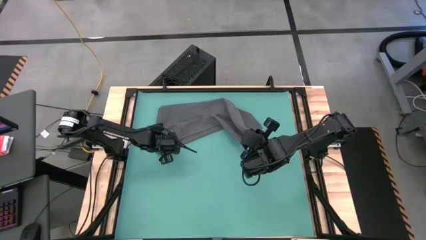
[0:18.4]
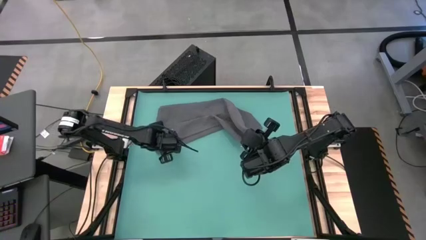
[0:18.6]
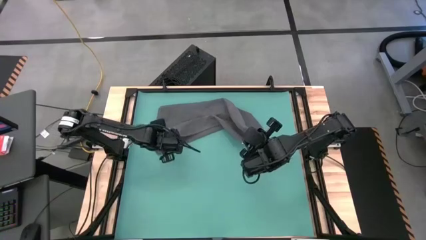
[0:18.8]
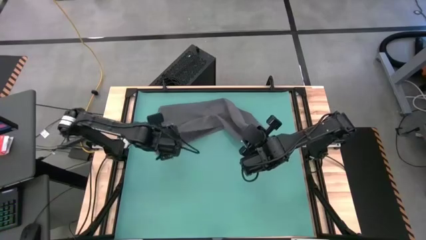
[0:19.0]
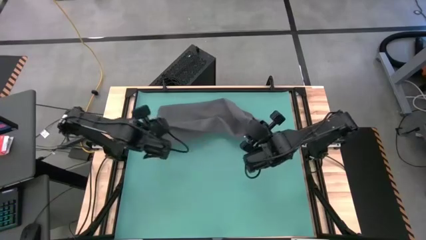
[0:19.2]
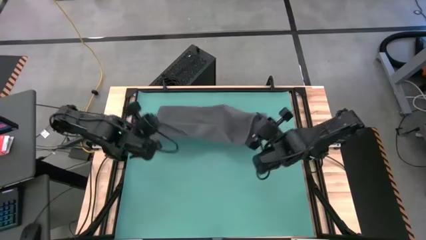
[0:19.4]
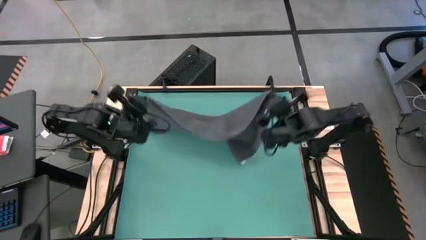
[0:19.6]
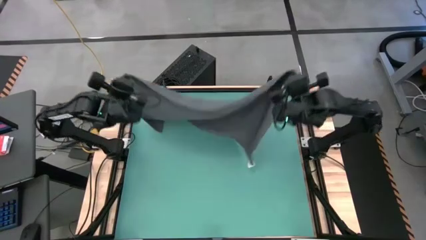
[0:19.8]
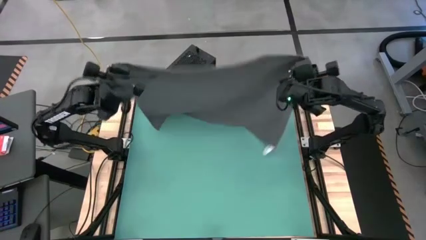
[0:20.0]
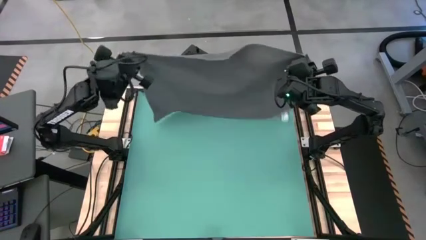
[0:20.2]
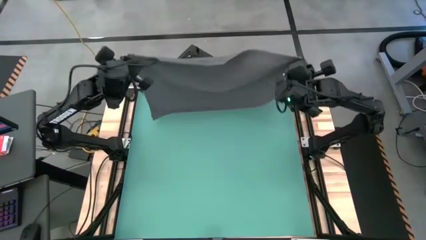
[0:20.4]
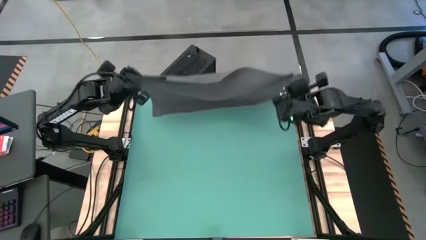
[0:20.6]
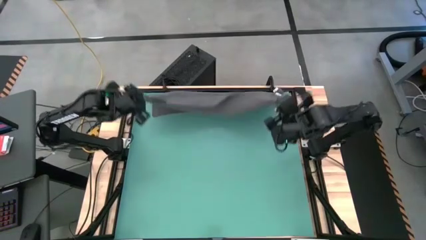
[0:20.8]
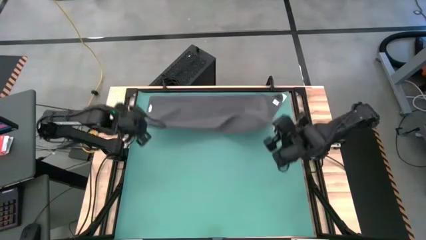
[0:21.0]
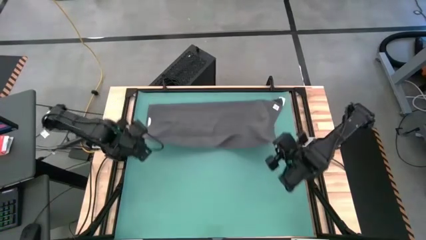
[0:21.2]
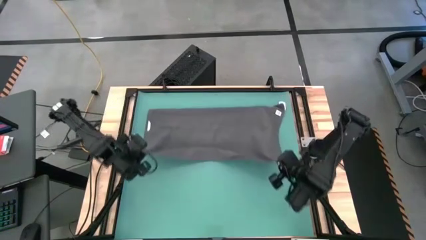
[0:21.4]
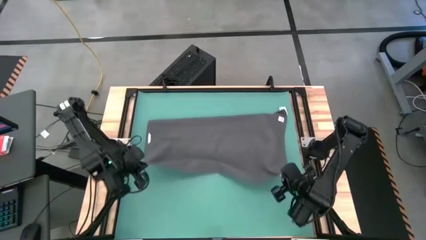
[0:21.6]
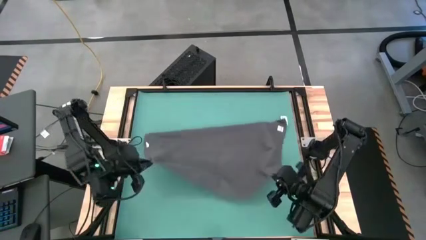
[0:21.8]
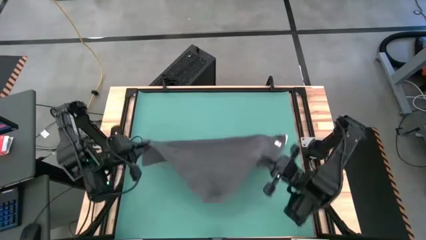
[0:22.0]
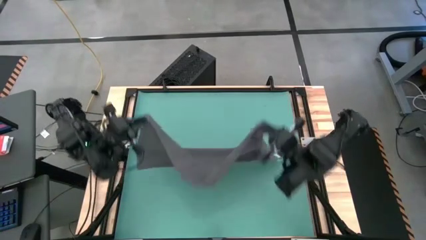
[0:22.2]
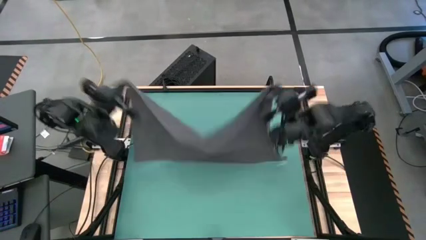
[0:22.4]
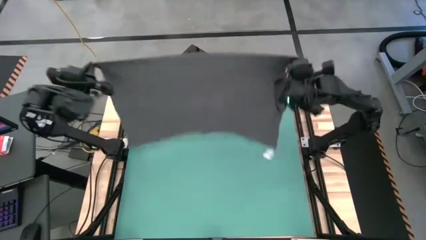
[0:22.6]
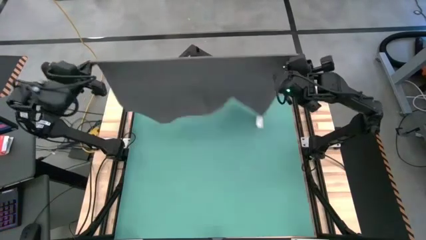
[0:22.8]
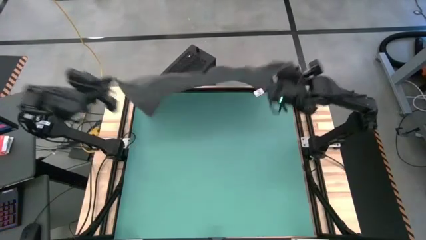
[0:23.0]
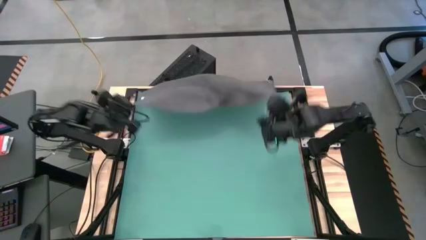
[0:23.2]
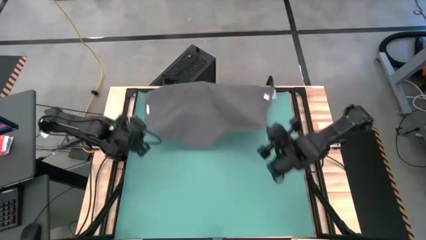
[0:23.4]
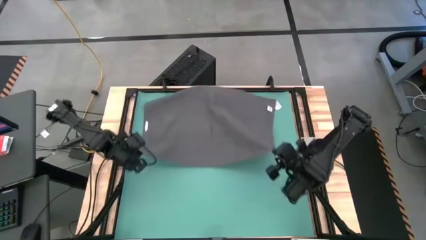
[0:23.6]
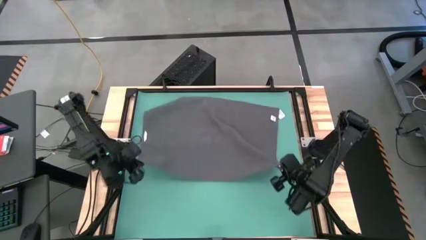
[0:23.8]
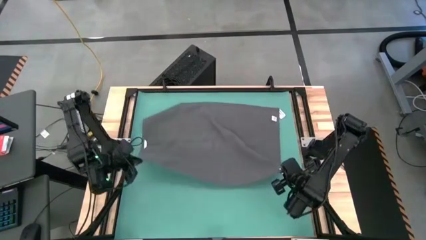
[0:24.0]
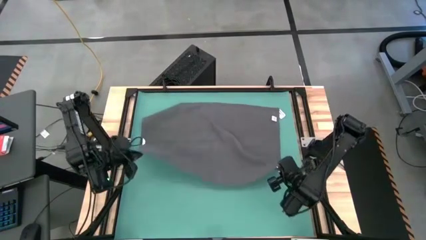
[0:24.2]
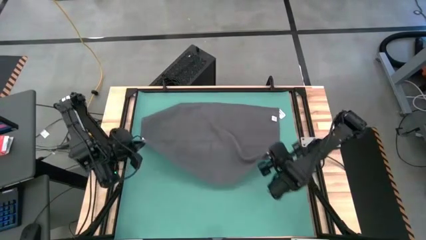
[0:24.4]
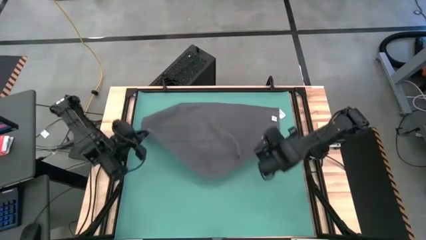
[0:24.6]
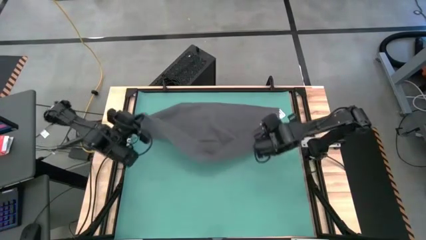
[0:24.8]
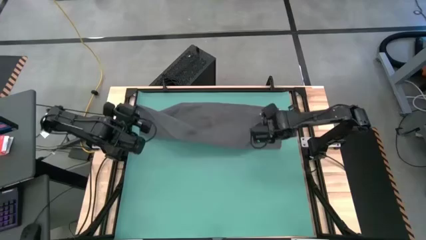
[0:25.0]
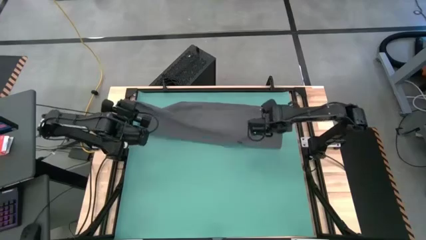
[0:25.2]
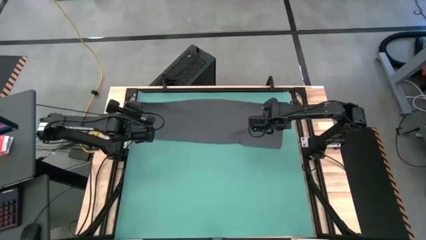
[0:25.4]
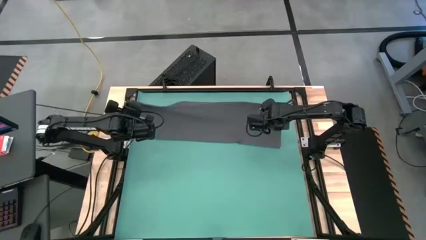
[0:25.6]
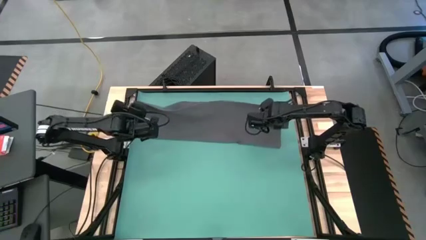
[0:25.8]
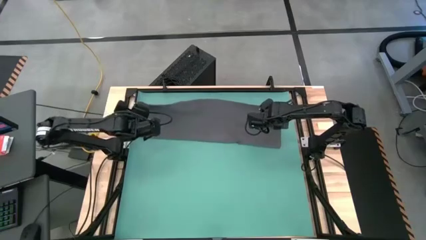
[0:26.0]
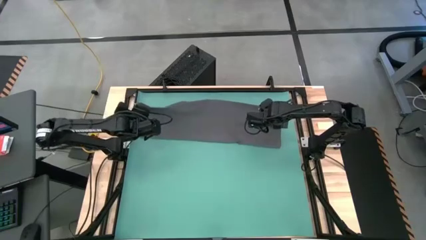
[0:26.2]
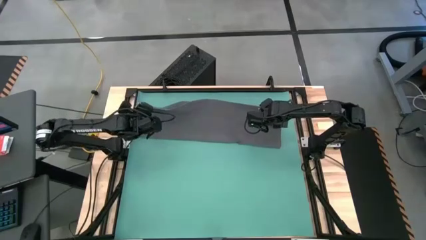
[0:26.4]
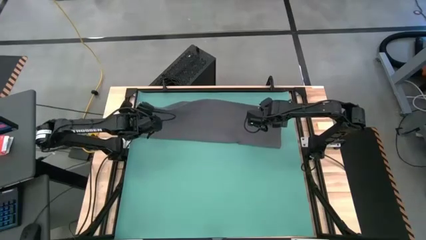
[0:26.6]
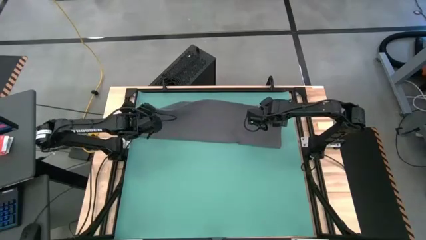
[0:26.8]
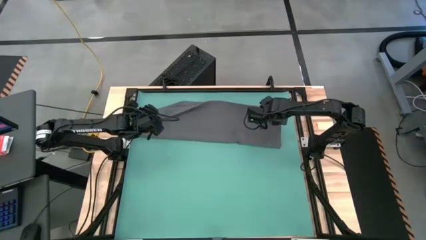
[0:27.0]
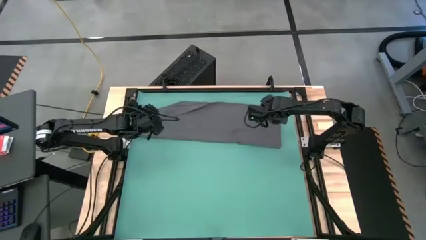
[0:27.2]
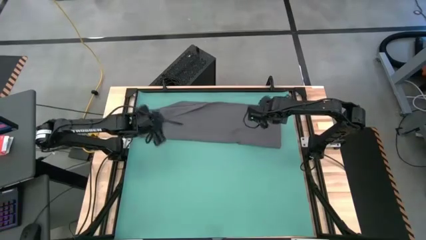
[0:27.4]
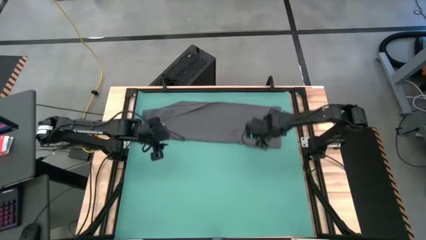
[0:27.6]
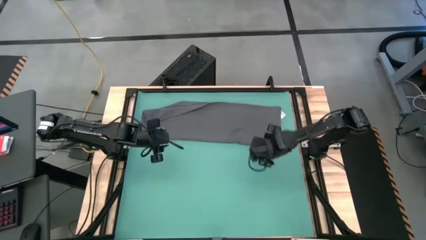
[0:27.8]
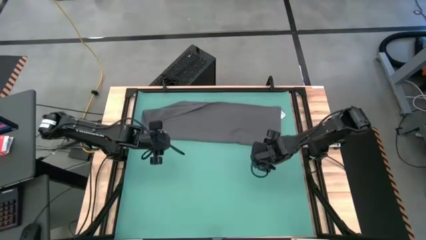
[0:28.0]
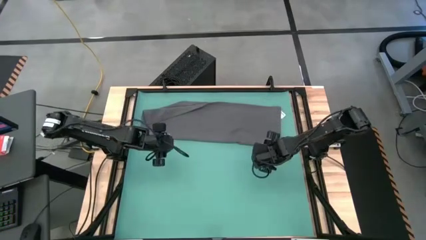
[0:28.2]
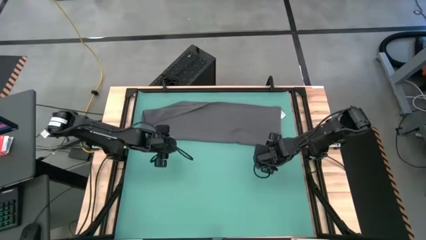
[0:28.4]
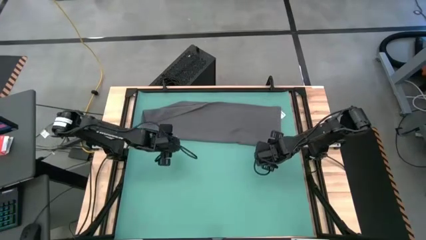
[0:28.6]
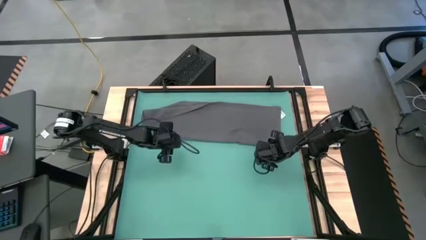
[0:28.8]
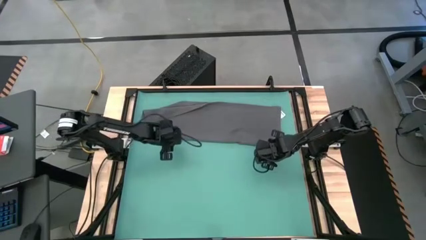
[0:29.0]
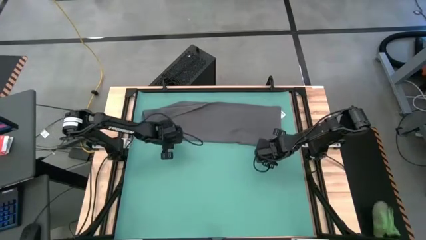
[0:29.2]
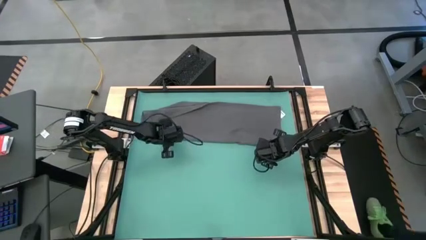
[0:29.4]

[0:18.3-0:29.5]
Task: Roll towel
Roll the gray towel

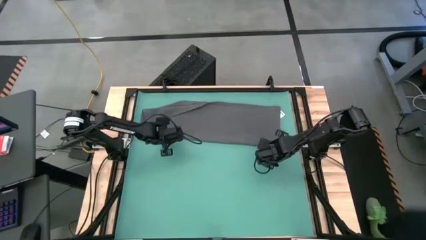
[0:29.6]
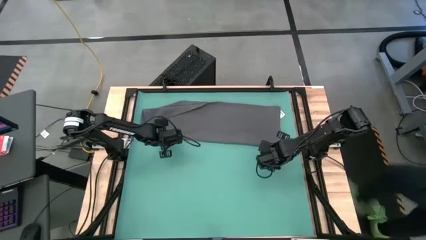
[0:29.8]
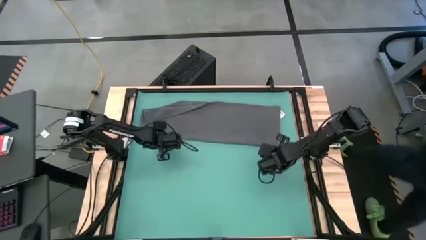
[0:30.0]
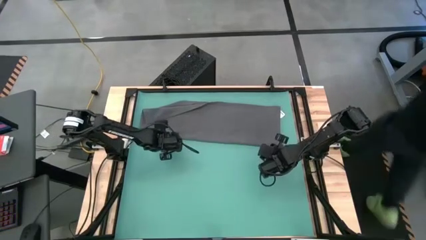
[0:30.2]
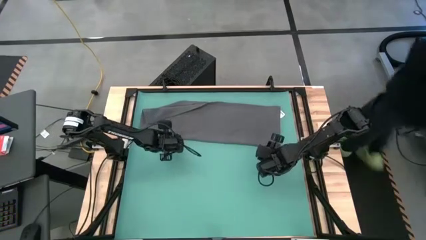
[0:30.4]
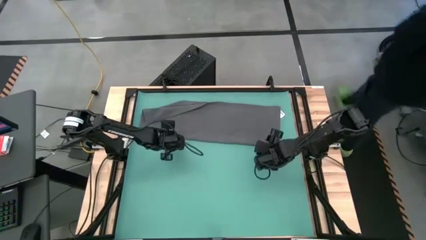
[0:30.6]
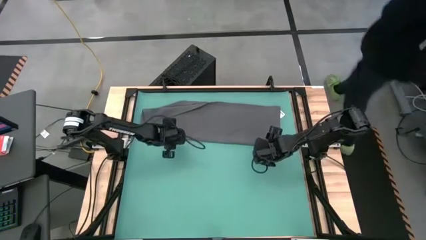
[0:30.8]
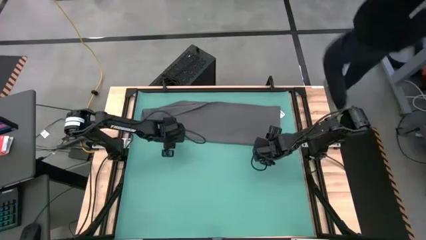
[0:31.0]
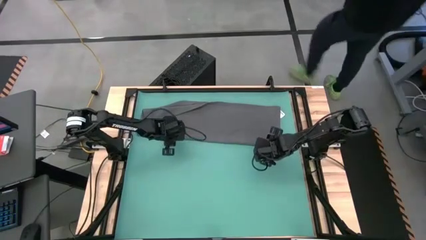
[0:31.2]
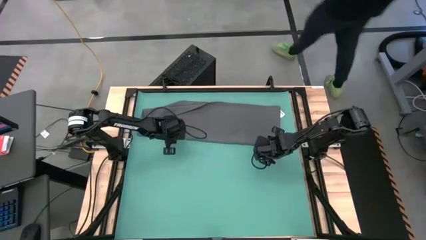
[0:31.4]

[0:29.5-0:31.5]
Roll the gray towel
